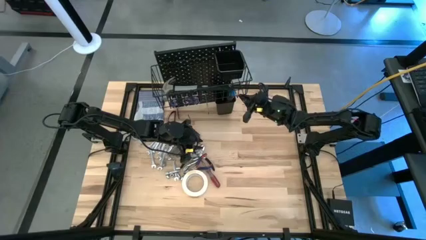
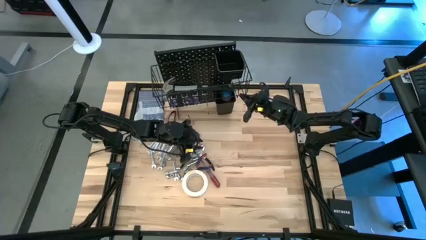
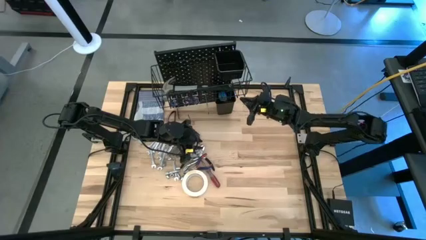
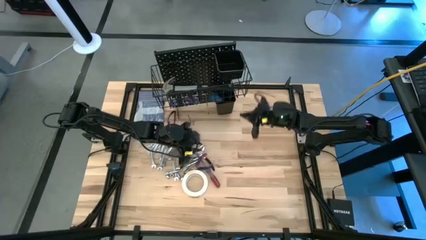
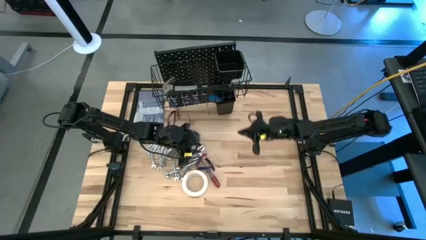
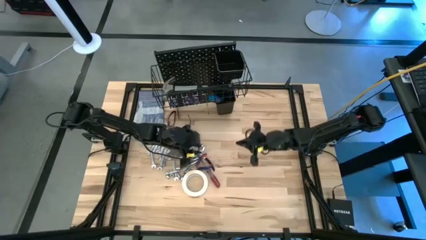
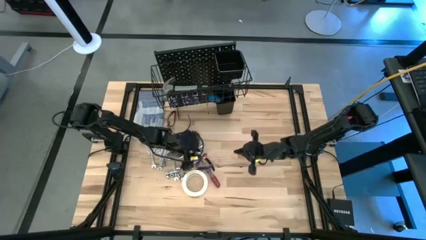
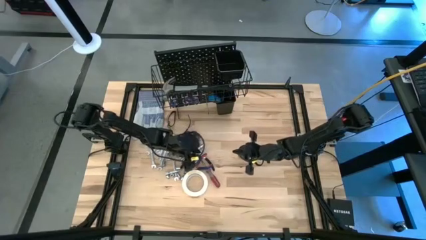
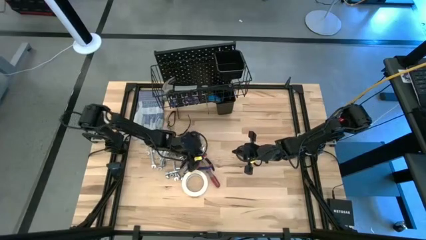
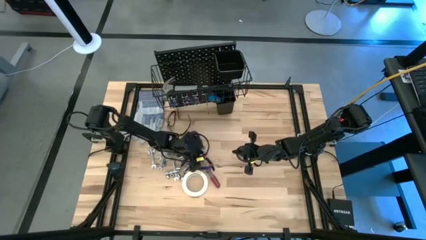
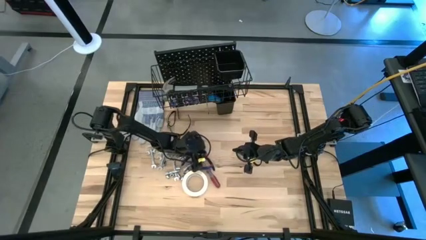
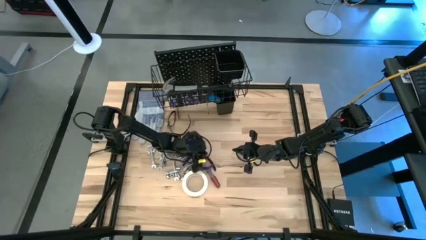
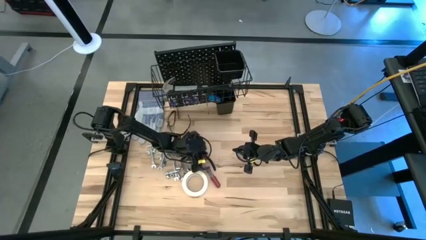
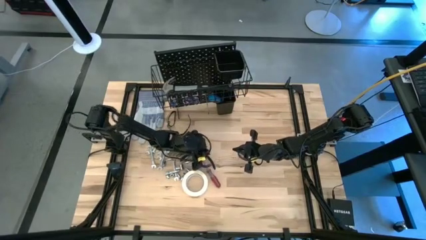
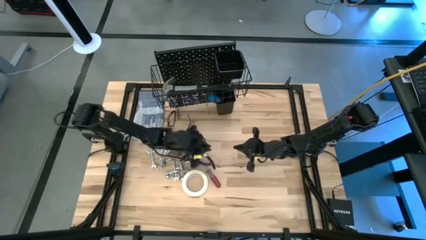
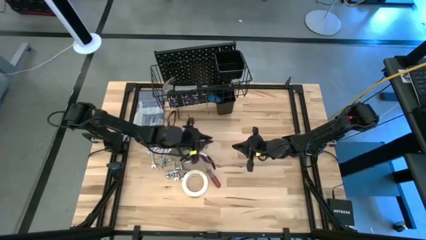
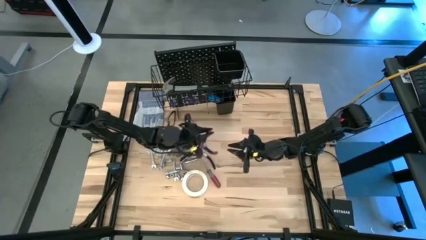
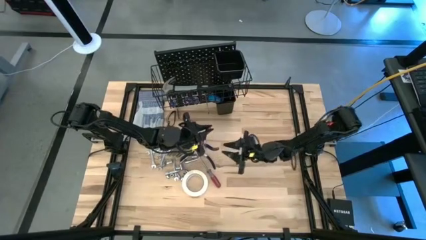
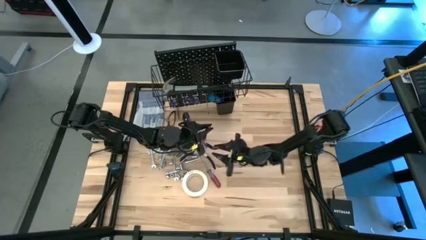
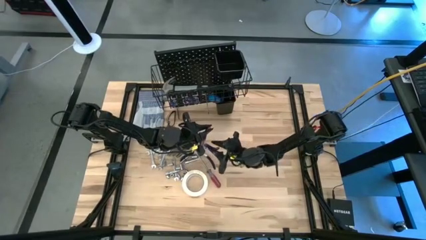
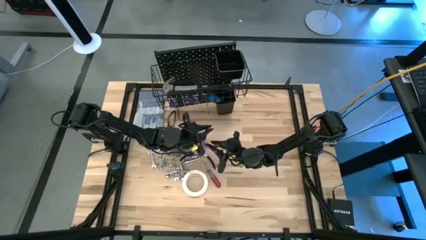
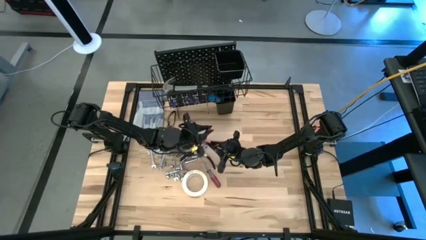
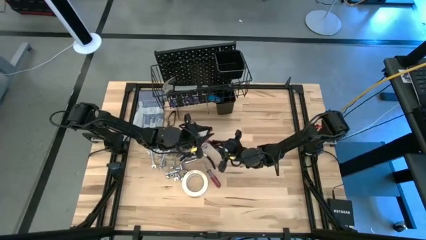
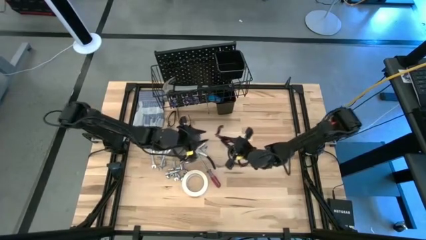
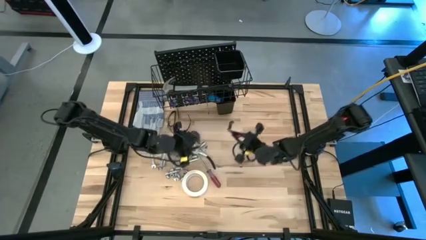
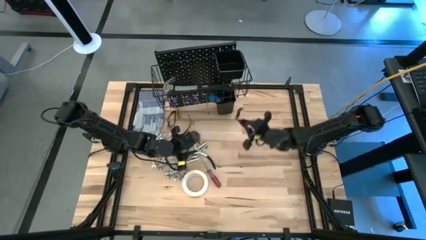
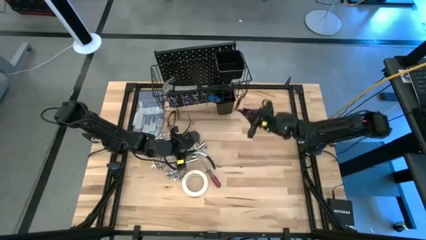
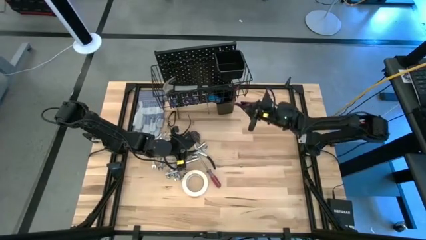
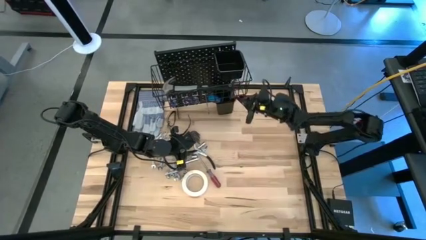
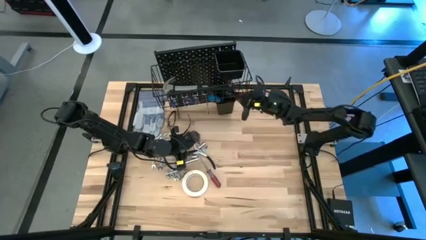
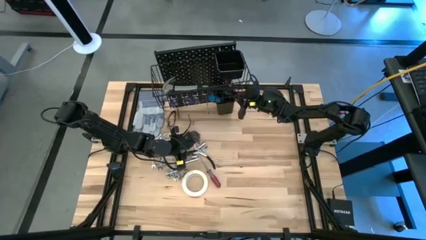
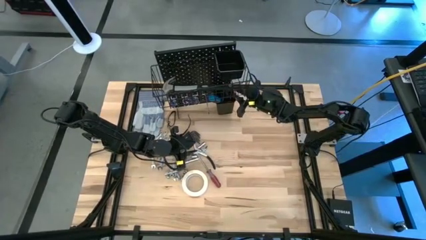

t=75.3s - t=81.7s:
Task: Hang tools onto peg board
Put the blue pliers into the bottom black bin on the pegboard

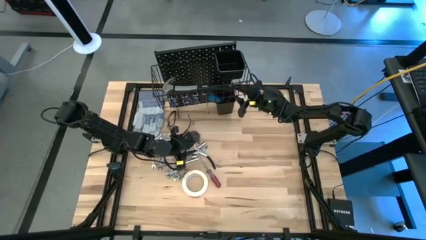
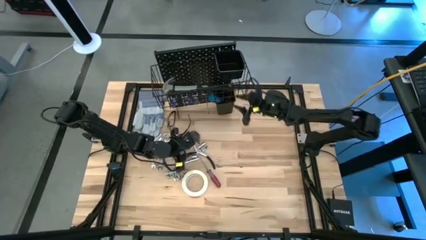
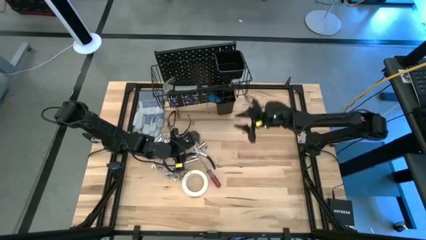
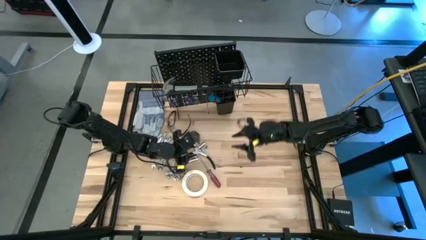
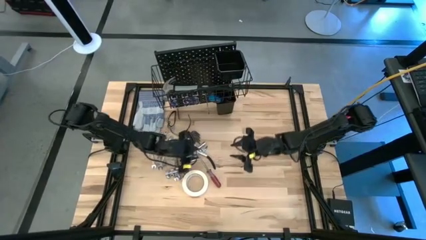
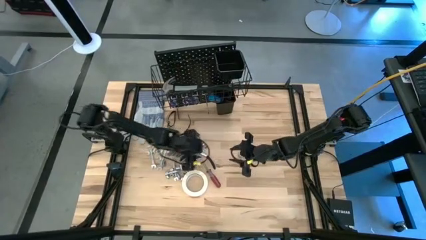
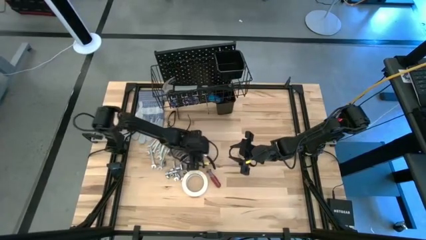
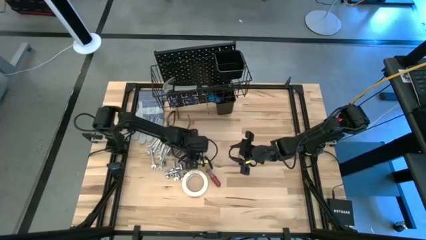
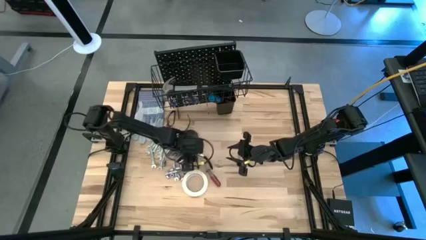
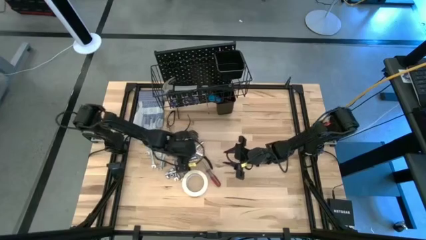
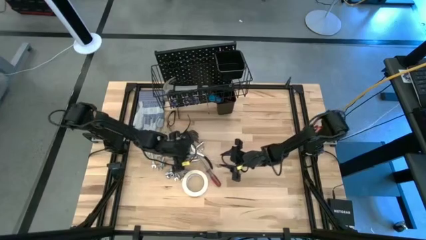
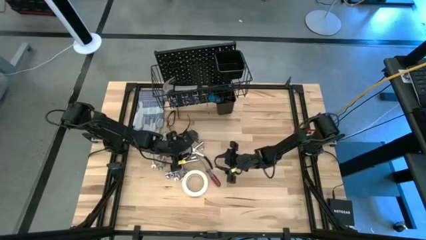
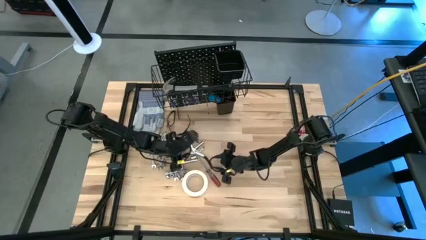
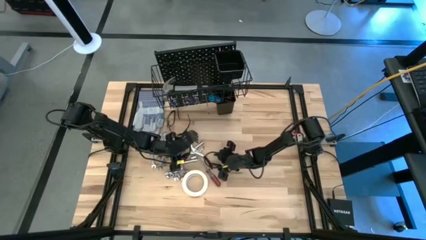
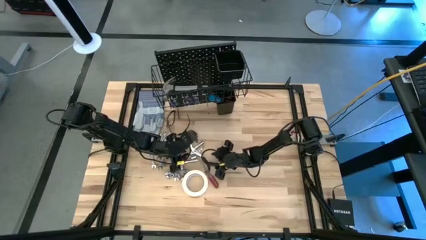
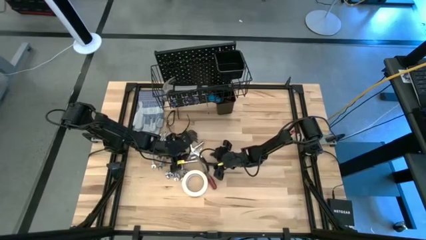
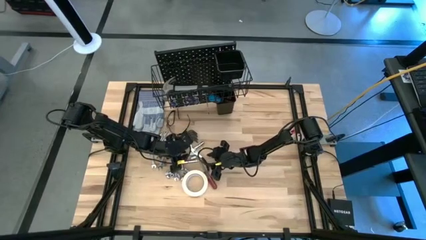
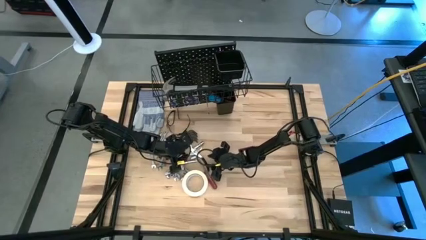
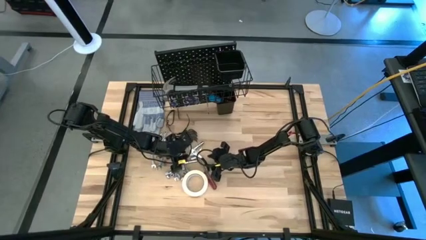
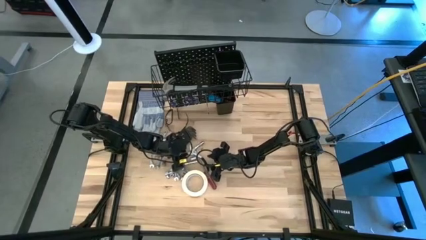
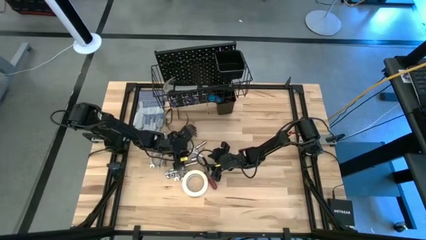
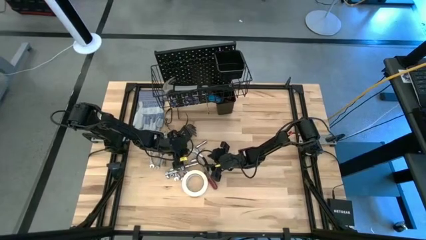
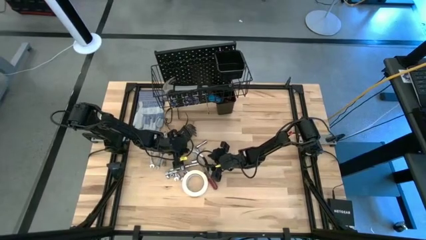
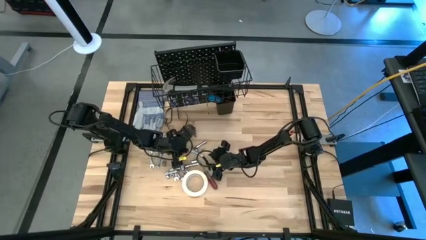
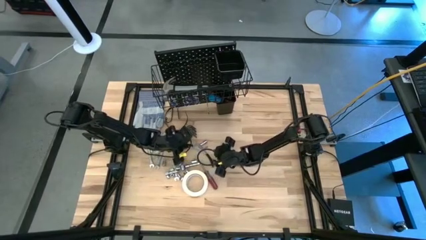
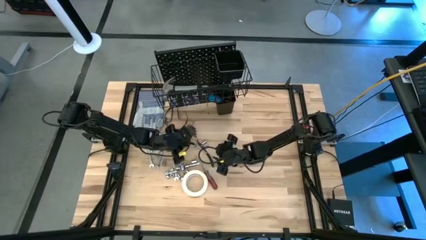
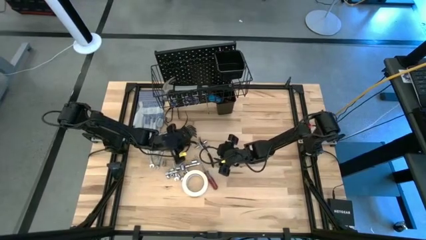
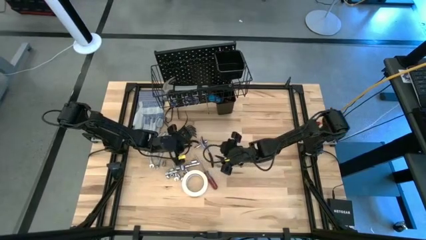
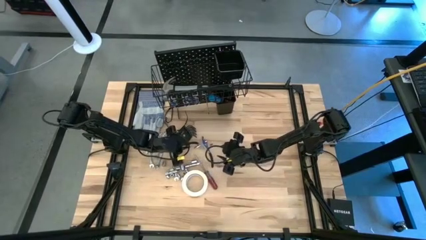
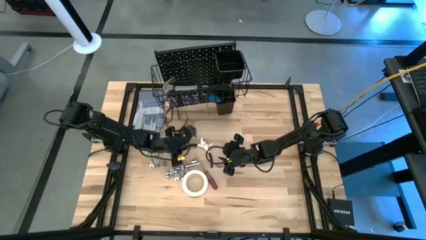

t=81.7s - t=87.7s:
Put the socket into the top black bin on the pegboard

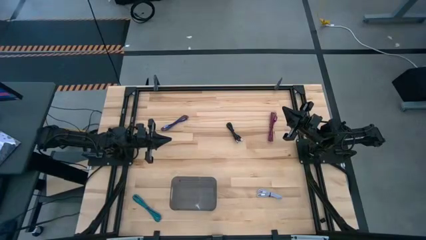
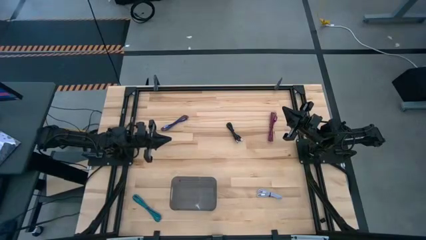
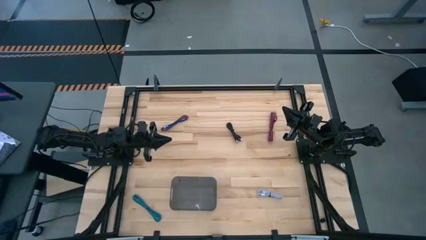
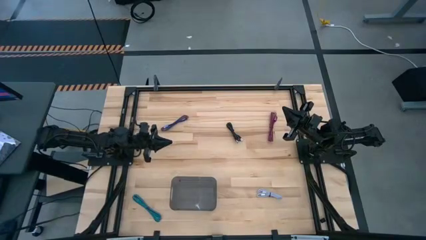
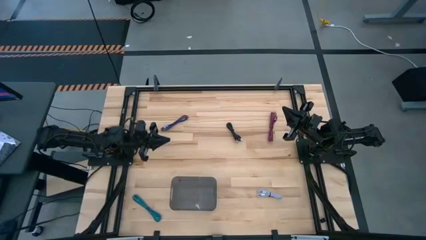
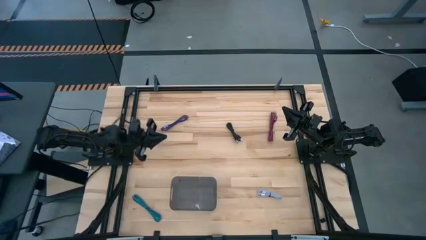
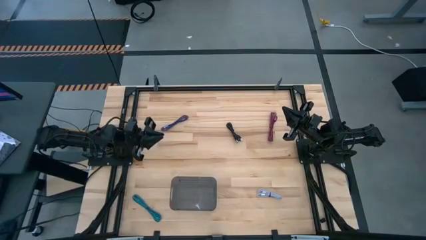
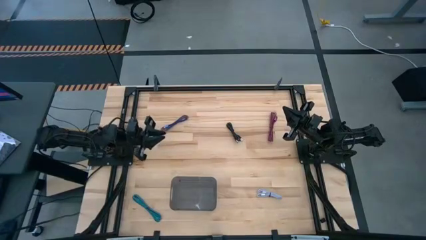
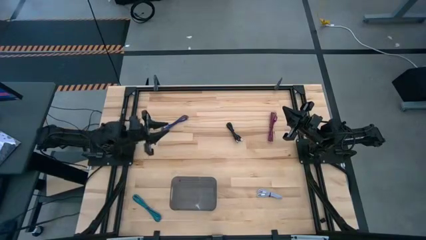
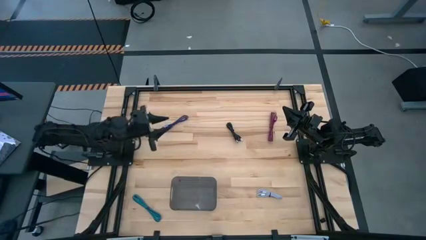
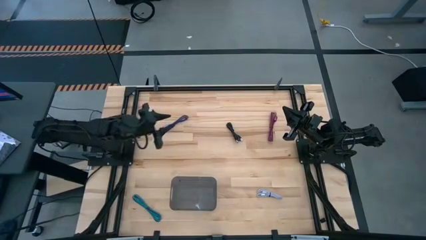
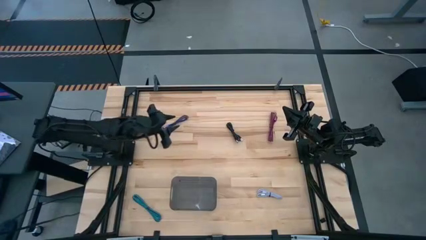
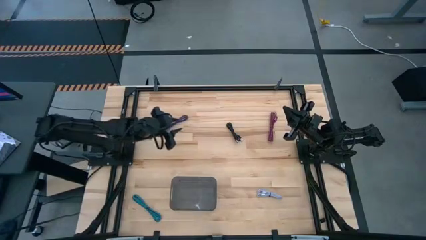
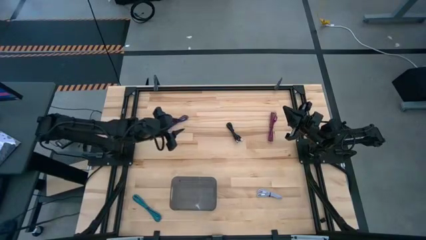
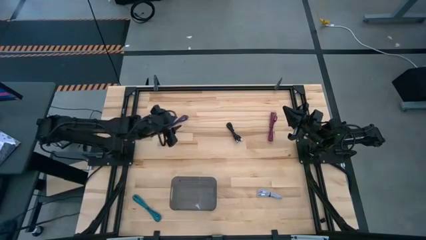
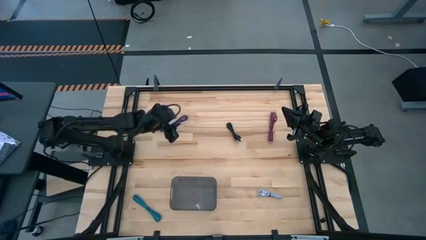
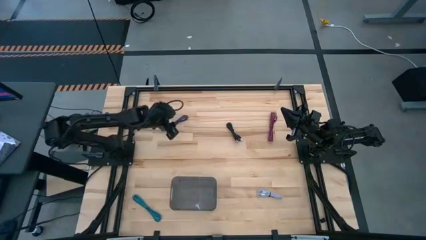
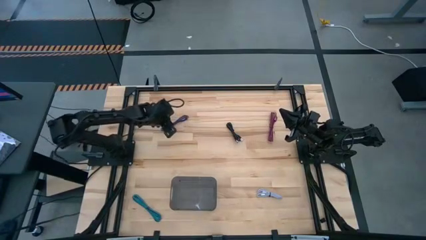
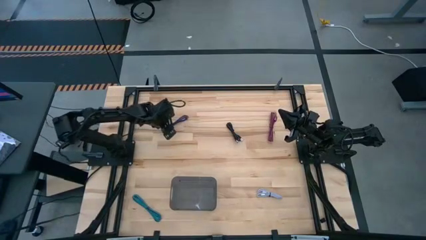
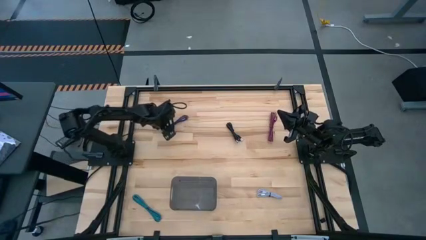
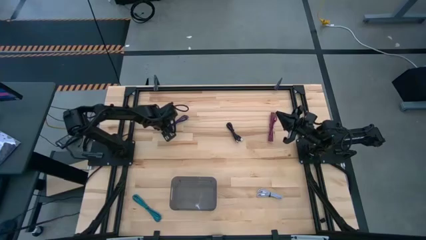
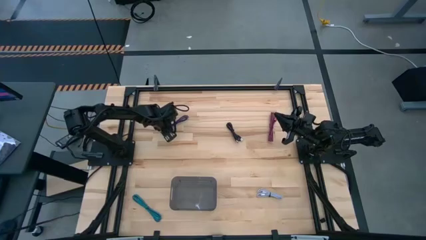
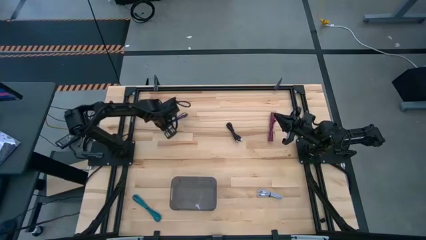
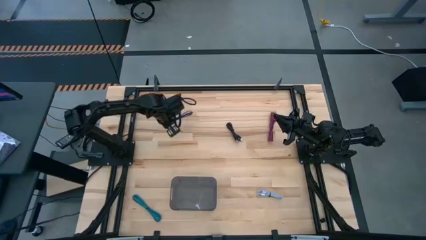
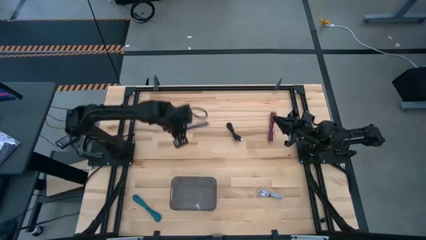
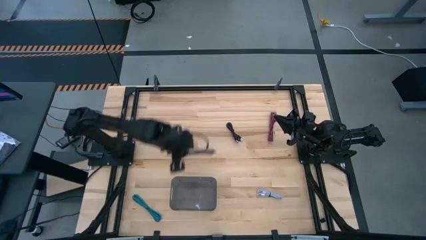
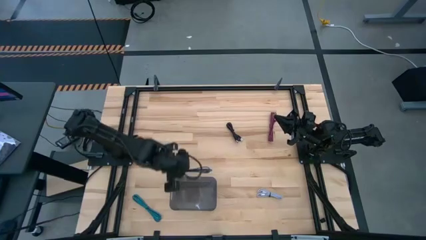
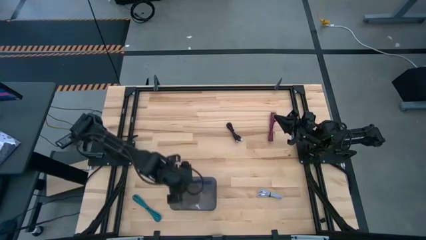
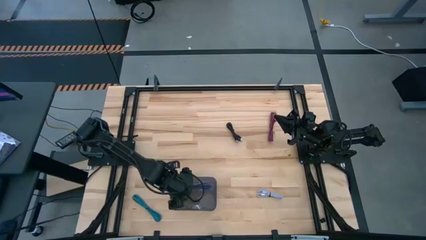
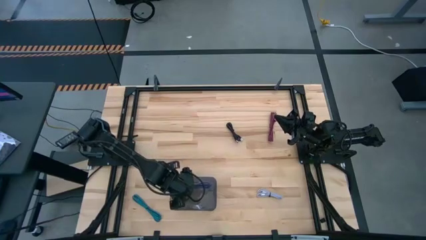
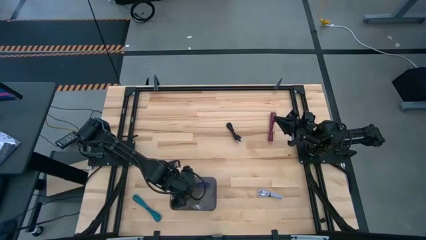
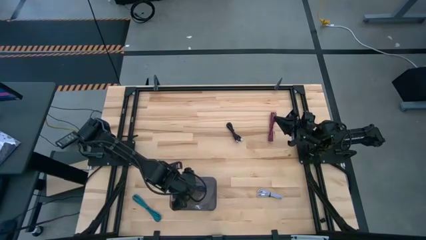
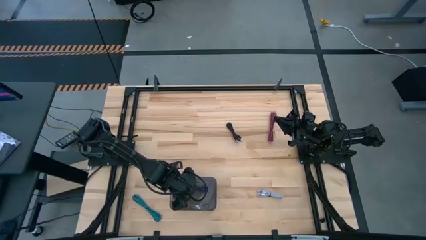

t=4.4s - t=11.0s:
Task: Pick and place USB-C Cables
Put the dark blue charger cable into the black bin
